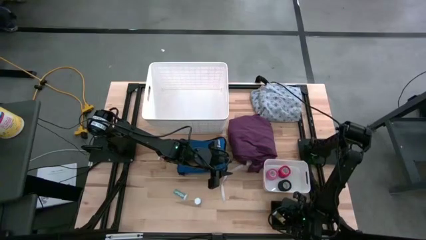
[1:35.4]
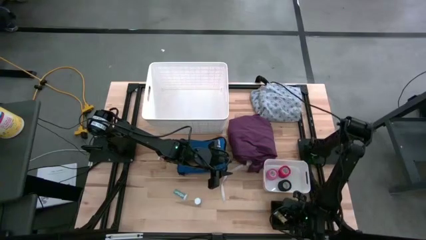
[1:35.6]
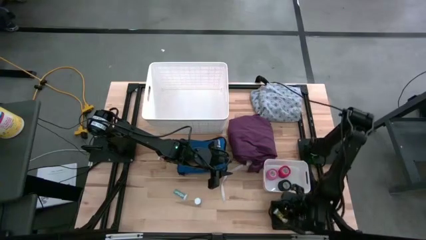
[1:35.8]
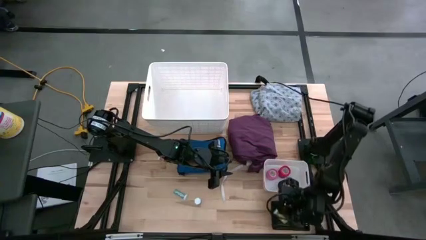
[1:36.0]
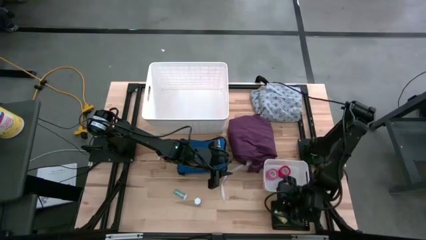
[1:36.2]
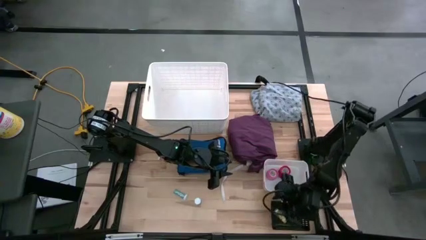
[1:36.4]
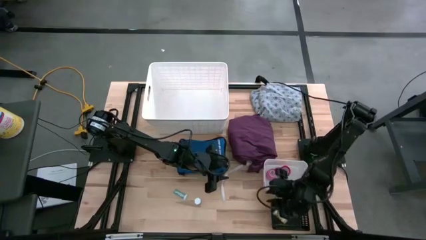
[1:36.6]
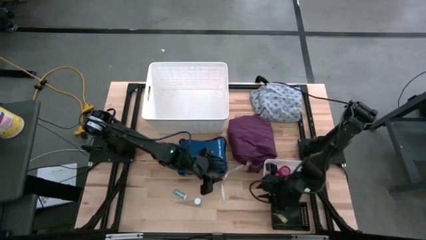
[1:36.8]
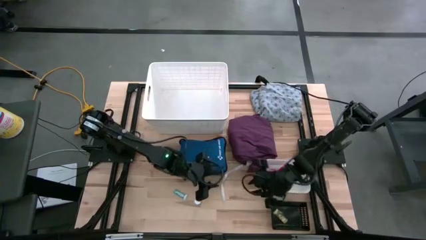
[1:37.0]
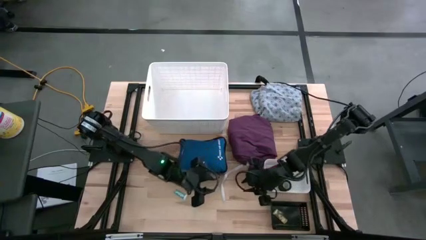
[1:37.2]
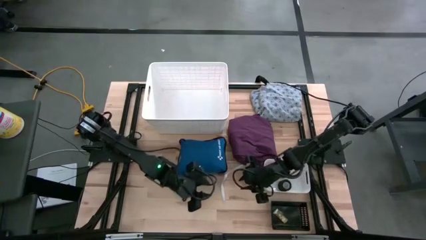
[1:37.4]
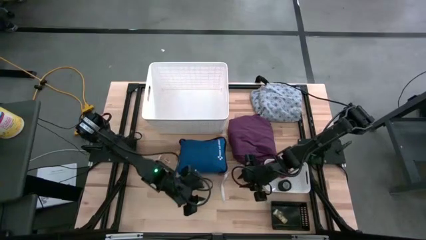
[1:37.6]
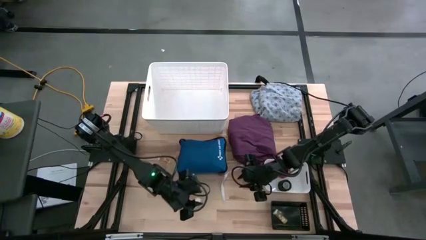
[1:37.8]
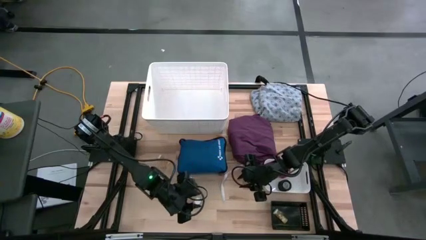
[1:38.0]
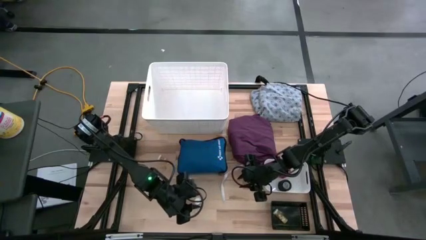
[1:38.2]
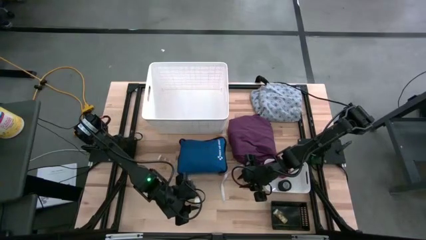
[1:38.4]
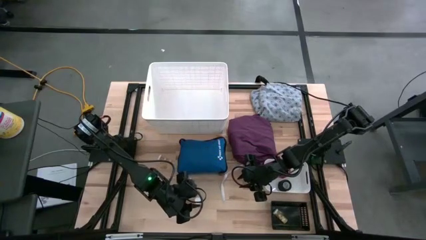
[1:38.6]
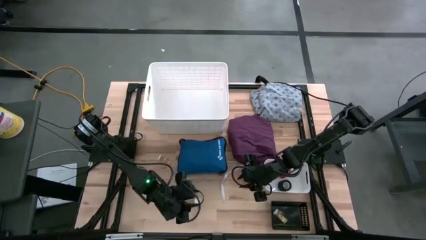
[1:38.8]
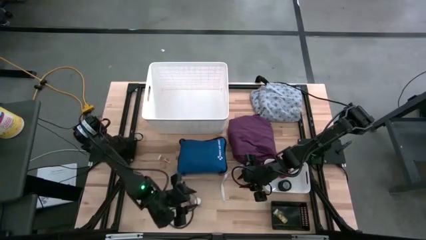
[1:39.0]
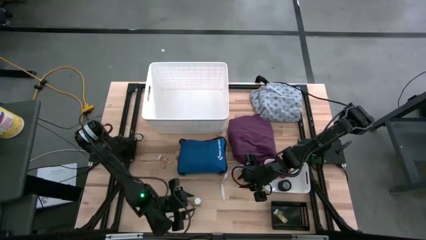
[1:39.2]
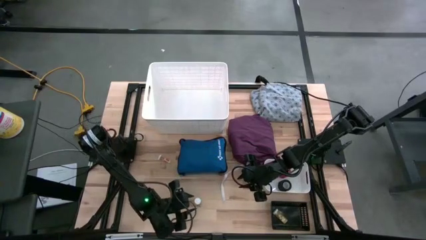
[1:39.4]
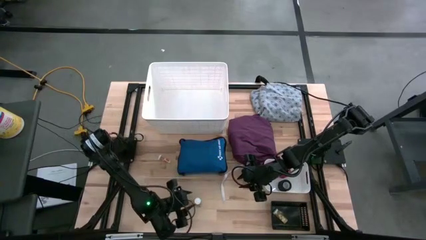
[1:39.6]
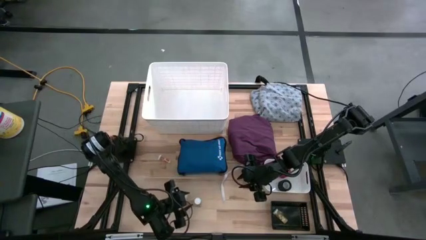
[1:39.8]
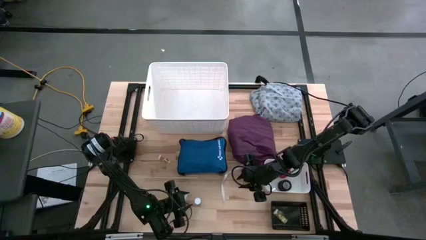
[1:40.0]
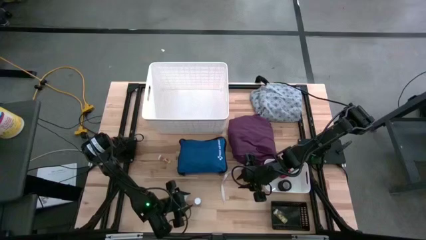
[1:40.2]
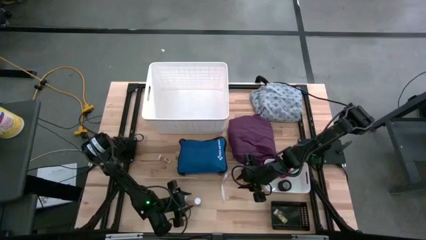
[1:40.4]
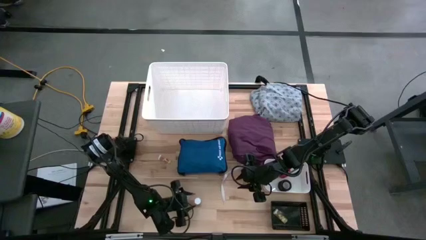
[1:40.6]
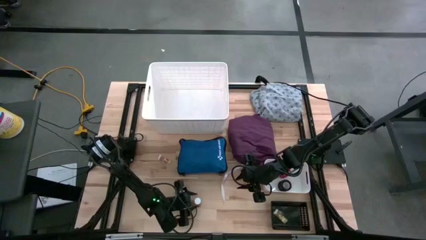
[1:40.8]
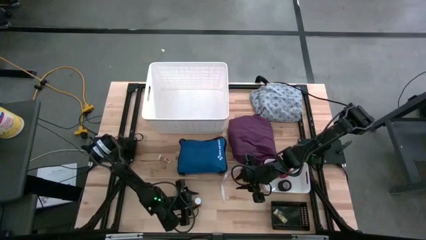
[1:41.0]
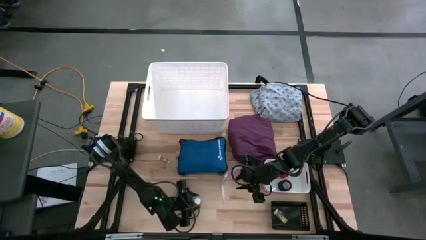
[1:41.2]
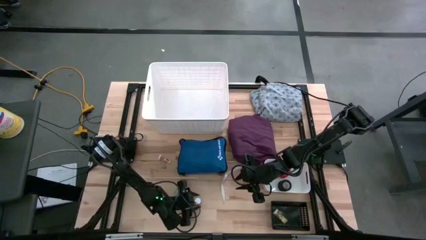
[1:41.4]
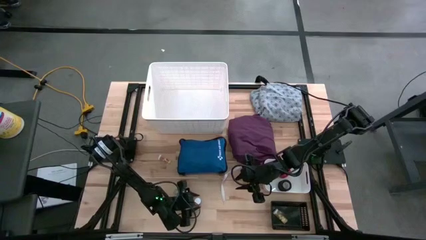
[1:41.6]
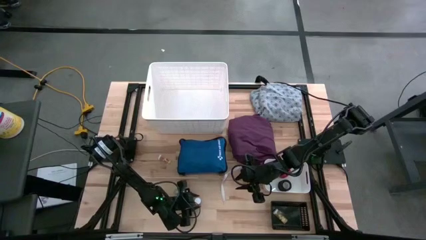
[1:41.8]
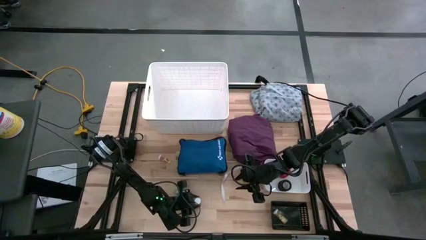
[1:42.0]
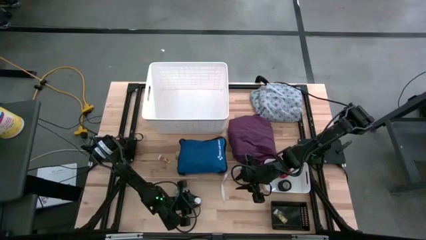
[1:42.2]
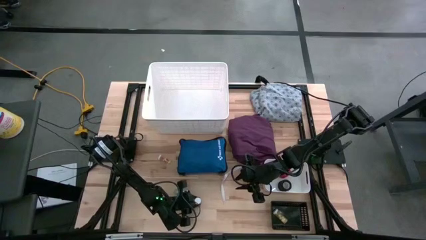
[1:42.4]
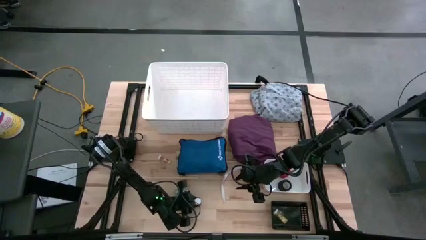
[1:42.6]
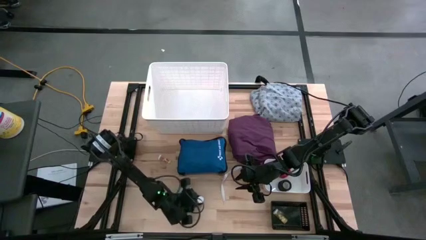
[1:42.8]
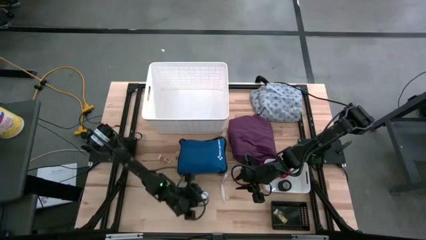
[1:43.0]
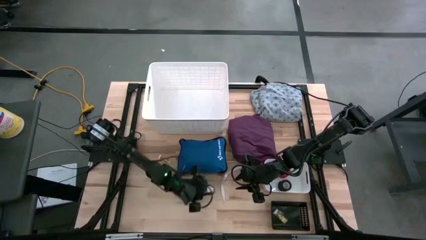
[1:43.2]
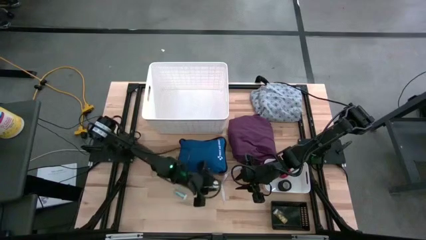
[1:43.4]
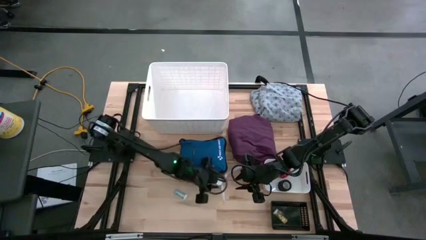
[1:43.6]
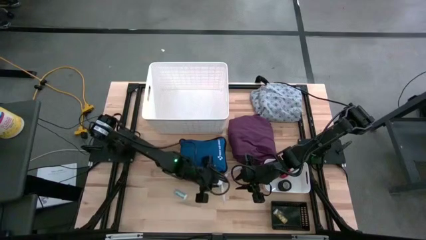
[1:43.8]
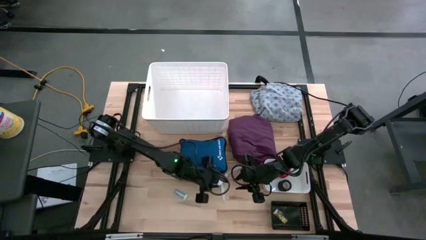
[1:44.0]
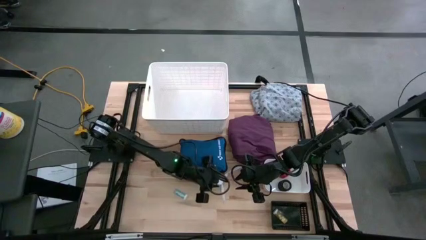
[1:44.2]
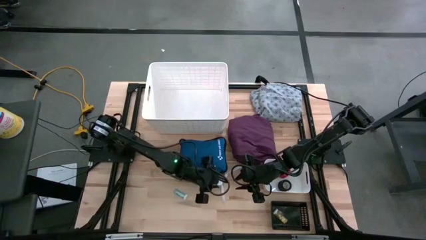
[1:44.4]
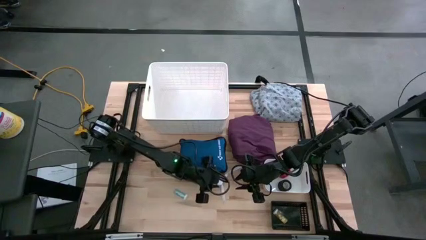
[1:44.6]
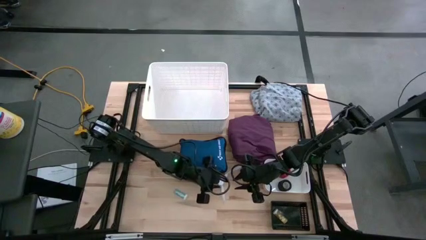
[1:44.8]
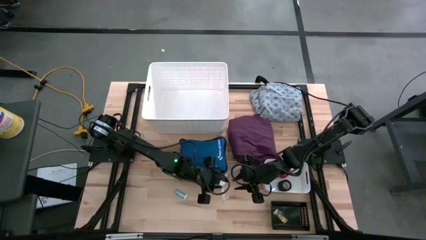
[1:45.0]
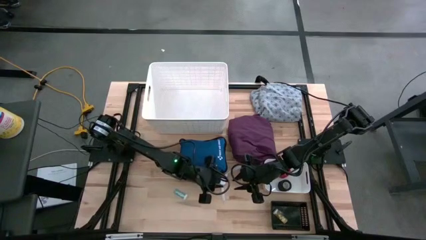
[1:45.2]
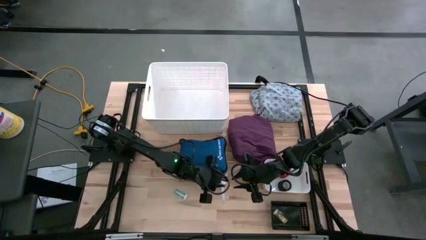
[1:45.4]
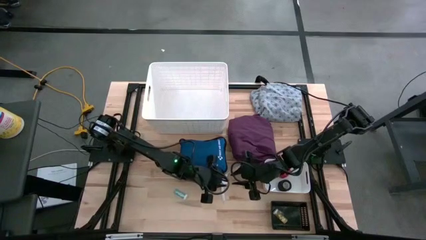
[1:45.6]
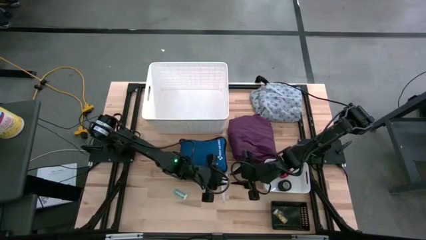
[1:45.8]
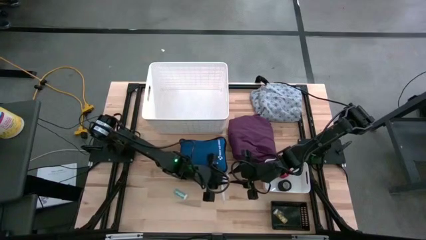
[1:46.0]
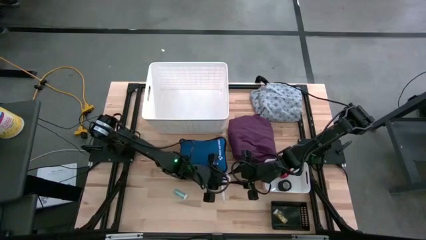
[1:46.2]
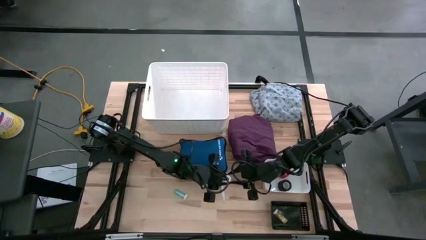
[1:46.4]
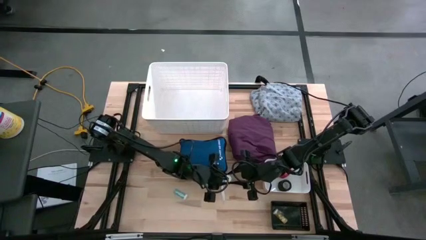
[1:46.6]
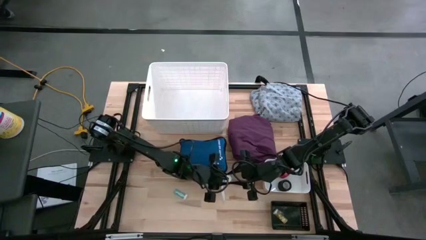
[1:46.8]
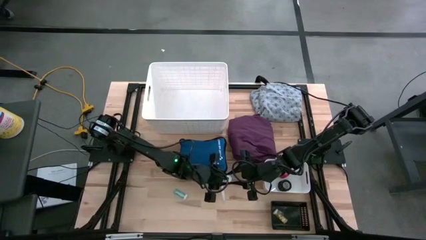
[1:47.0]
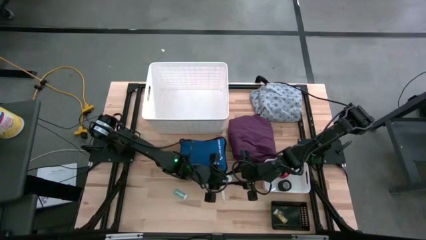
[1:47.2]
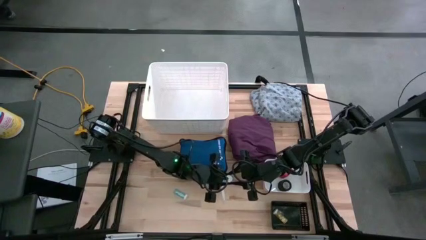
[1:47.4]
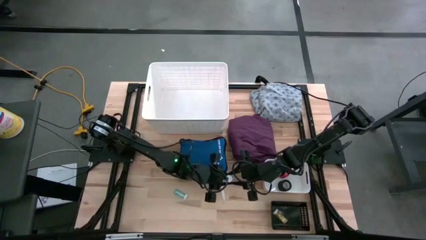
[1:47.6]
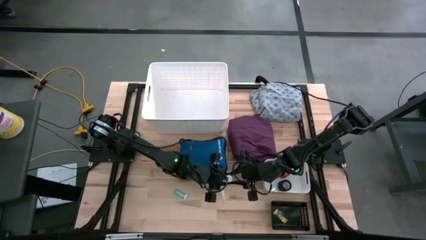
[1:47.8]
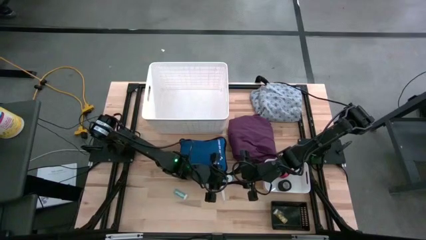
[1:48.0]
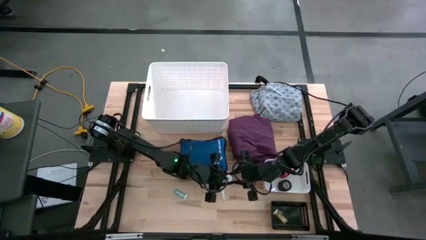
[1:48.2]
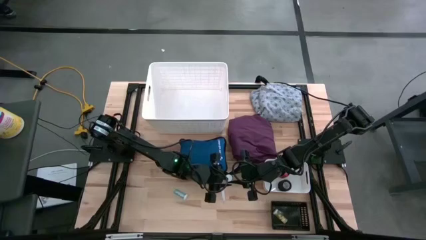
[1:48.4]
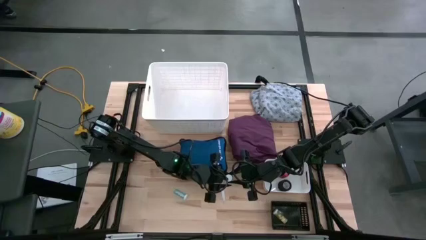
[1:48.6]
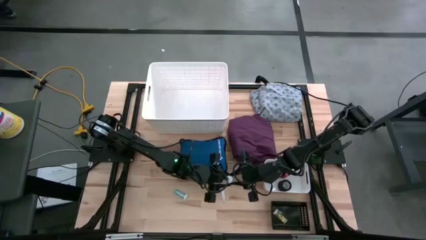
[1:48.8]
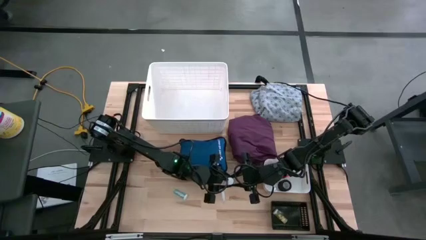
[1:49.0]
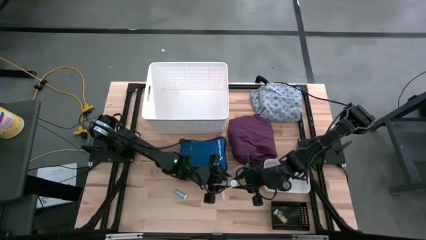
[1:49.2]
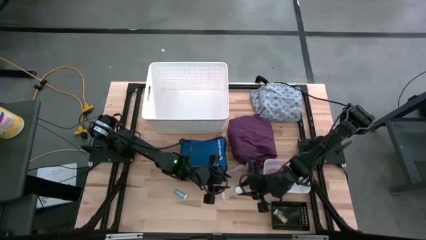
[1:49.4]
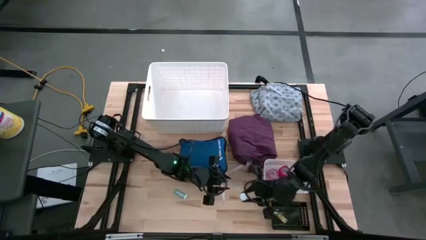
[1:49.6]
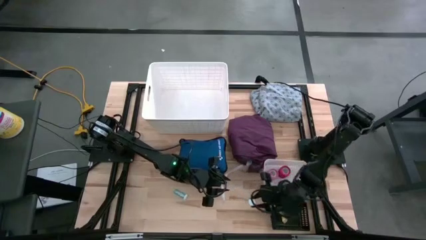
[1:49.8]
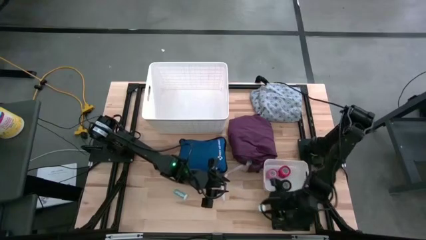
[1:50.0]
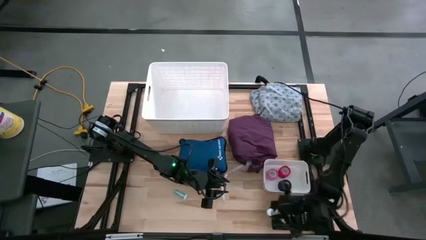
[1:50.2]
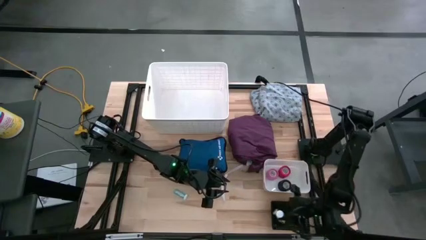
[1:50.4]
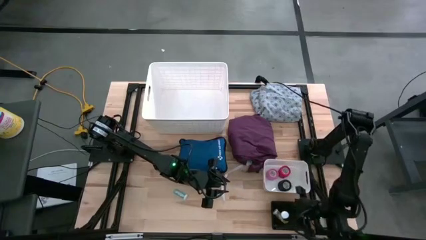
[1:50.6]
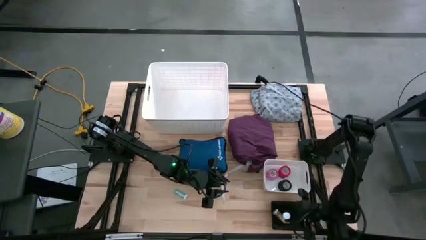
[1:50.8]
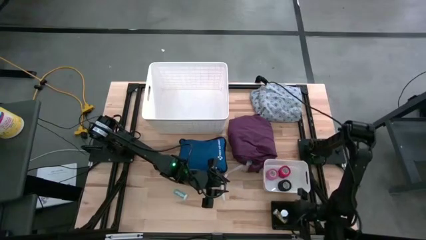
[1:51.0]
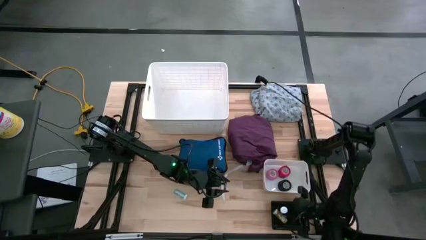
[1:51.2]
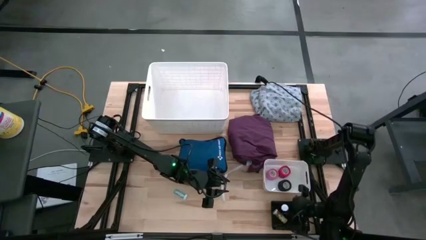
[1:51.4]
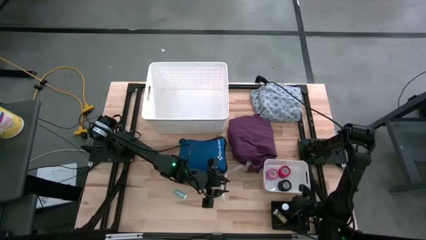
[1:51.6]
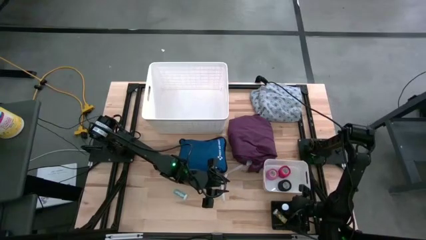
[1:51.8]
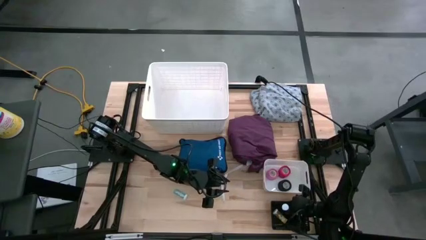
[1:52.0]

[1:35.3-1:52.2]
Task: Pick & Place Medicine items
Put the bottom blue pill bottle into the black bin
